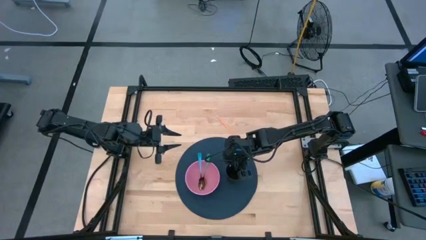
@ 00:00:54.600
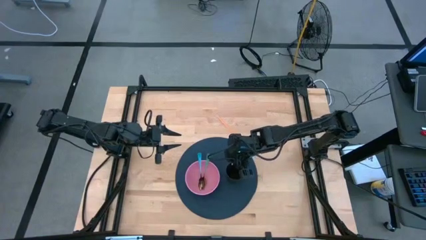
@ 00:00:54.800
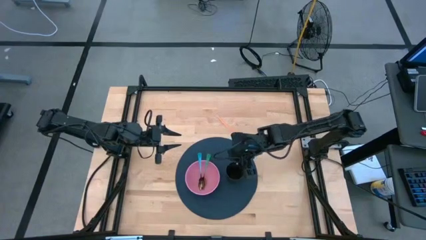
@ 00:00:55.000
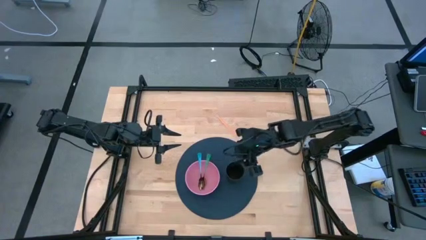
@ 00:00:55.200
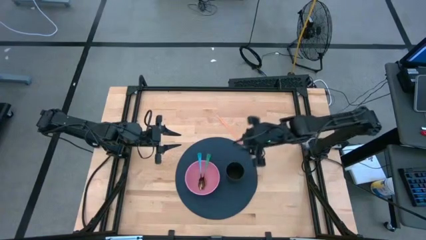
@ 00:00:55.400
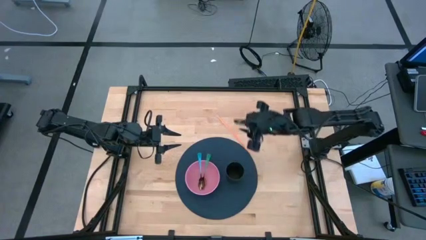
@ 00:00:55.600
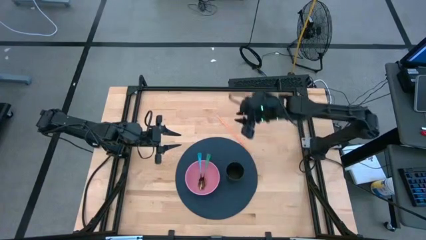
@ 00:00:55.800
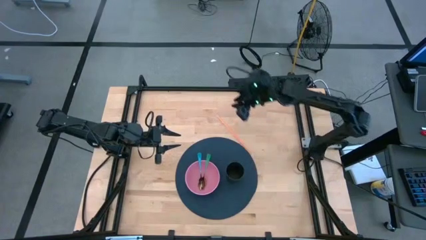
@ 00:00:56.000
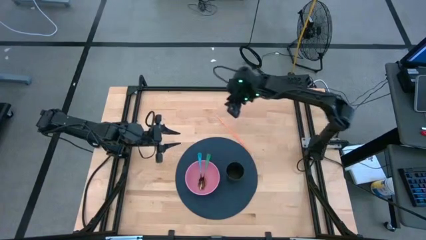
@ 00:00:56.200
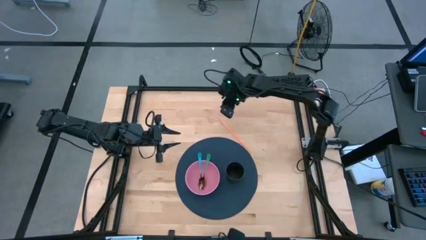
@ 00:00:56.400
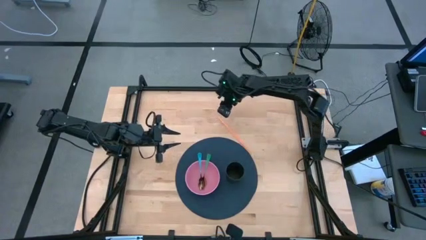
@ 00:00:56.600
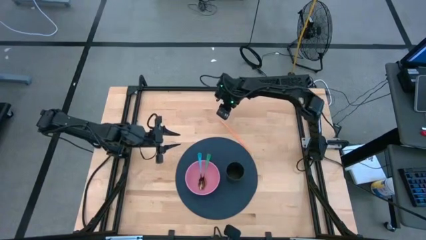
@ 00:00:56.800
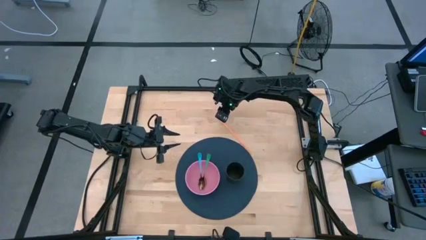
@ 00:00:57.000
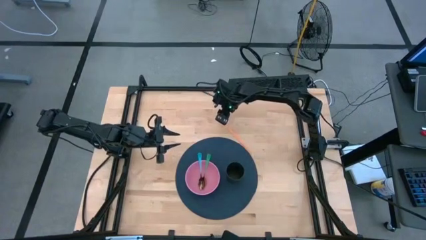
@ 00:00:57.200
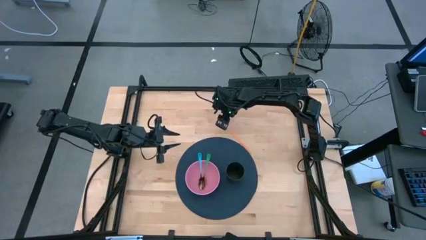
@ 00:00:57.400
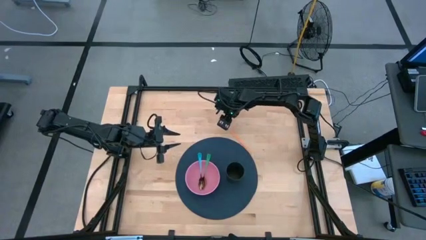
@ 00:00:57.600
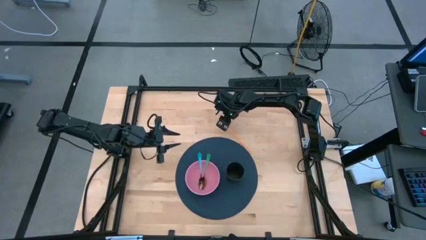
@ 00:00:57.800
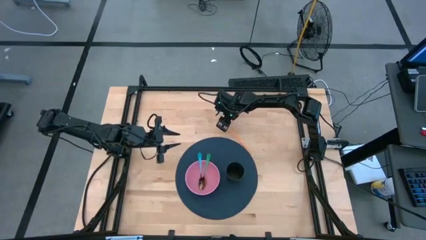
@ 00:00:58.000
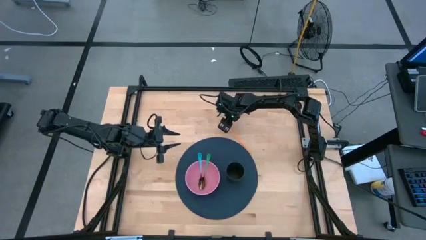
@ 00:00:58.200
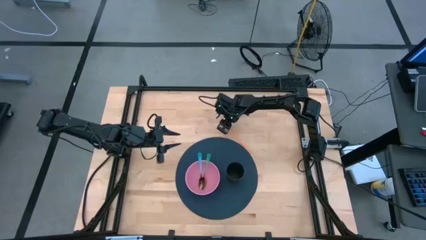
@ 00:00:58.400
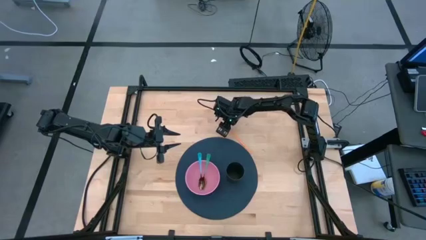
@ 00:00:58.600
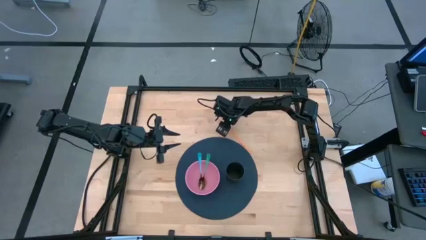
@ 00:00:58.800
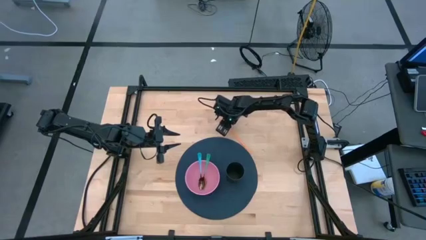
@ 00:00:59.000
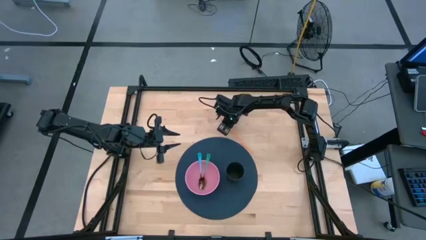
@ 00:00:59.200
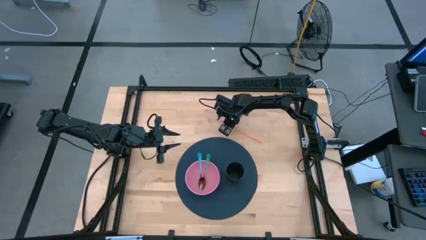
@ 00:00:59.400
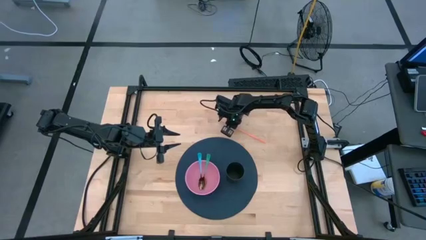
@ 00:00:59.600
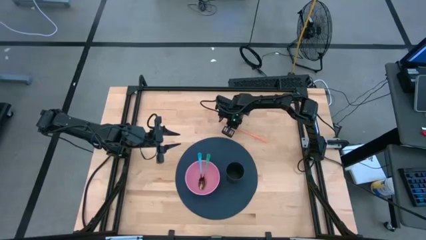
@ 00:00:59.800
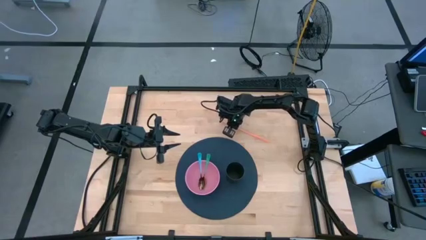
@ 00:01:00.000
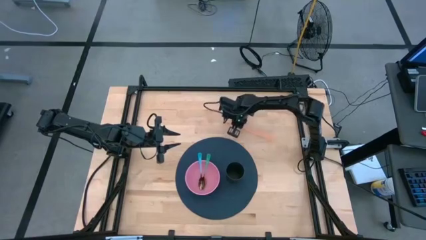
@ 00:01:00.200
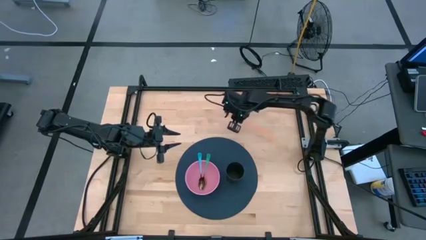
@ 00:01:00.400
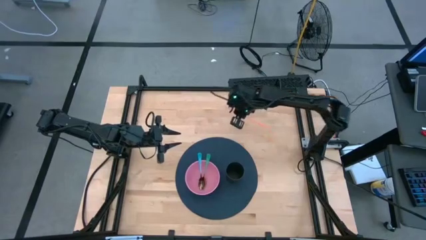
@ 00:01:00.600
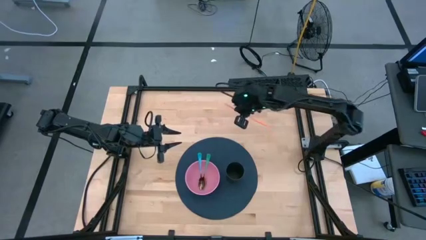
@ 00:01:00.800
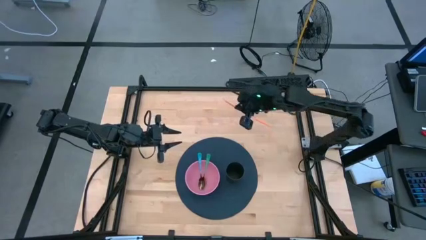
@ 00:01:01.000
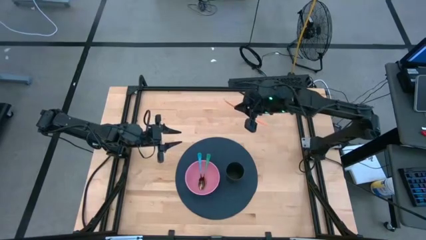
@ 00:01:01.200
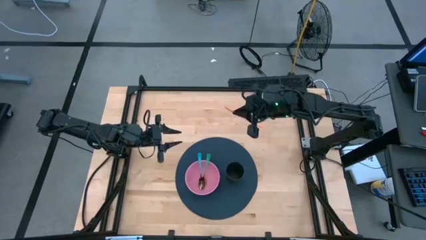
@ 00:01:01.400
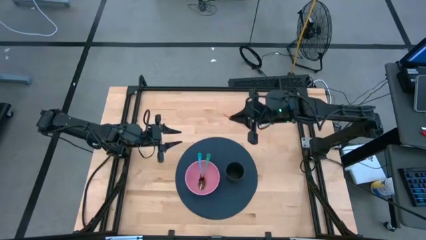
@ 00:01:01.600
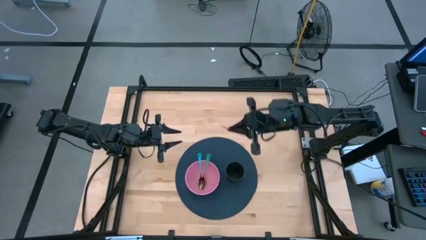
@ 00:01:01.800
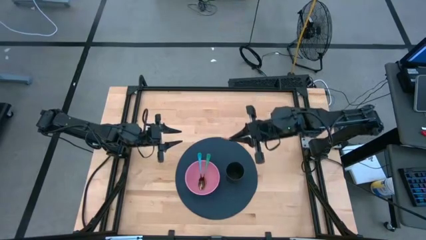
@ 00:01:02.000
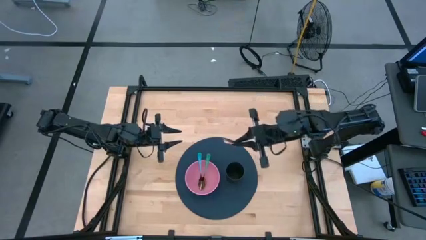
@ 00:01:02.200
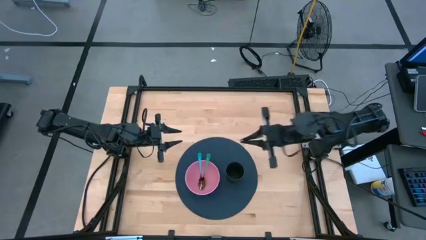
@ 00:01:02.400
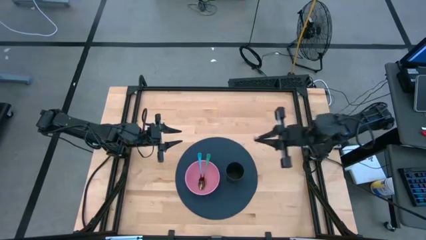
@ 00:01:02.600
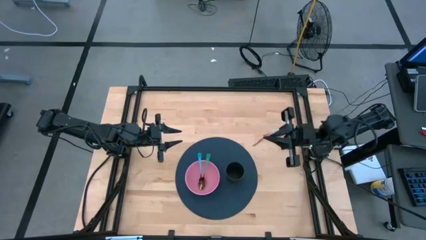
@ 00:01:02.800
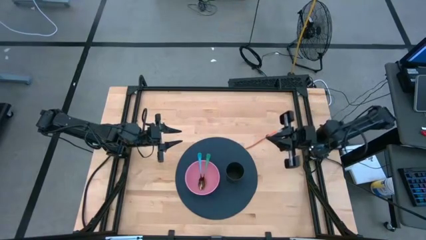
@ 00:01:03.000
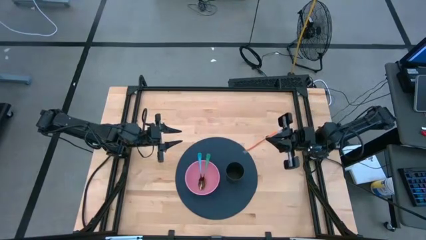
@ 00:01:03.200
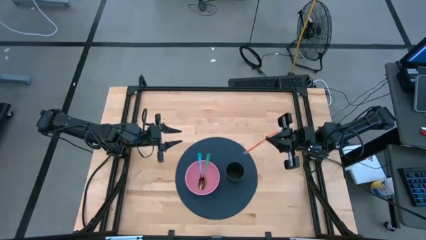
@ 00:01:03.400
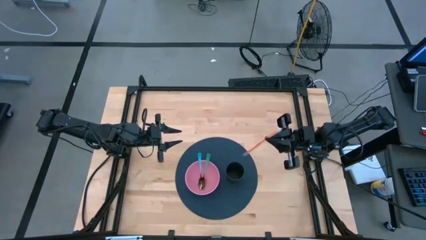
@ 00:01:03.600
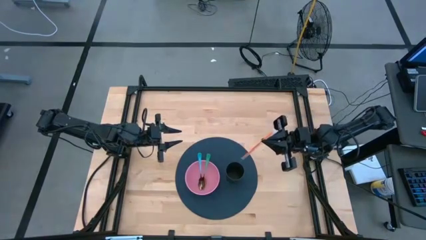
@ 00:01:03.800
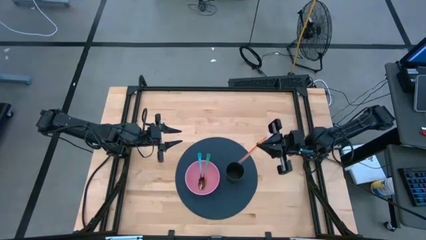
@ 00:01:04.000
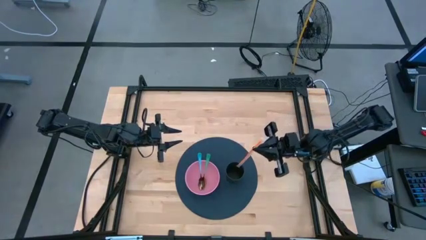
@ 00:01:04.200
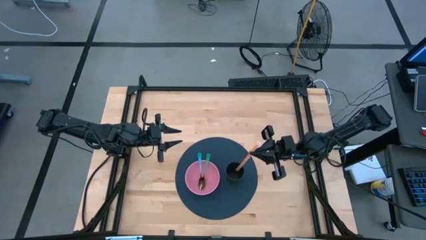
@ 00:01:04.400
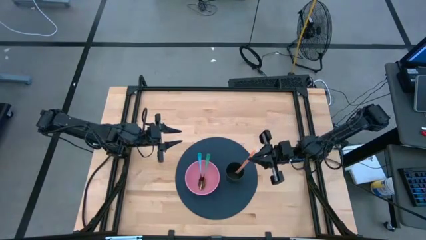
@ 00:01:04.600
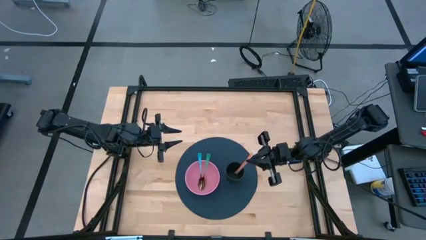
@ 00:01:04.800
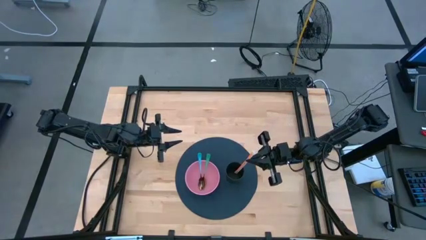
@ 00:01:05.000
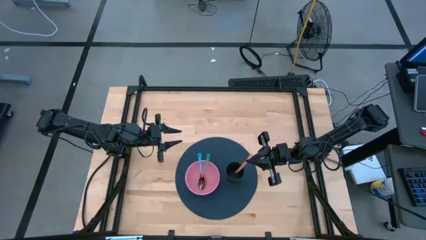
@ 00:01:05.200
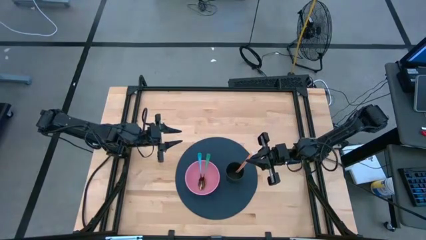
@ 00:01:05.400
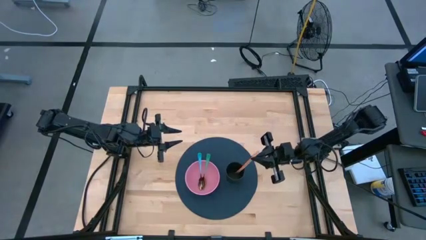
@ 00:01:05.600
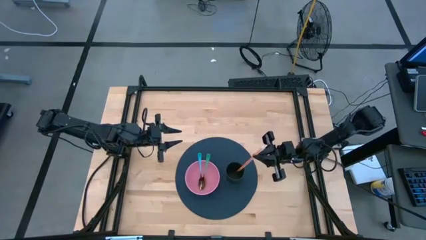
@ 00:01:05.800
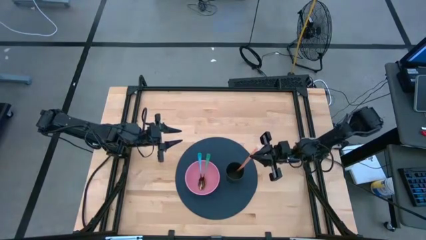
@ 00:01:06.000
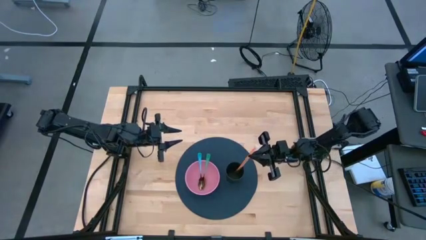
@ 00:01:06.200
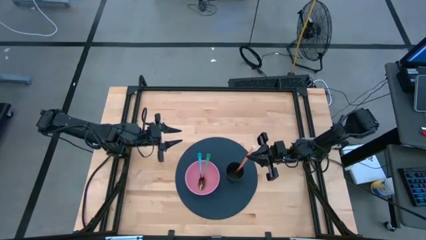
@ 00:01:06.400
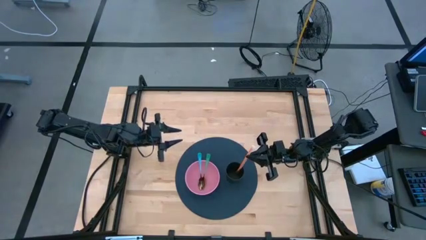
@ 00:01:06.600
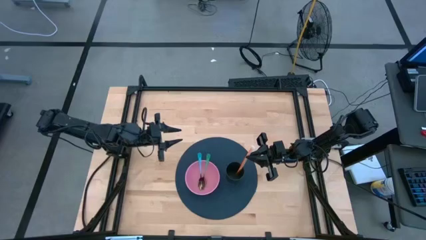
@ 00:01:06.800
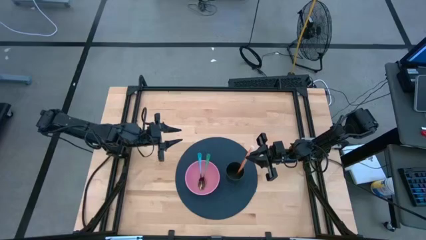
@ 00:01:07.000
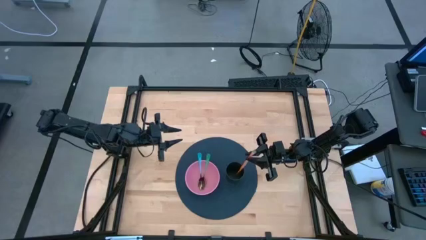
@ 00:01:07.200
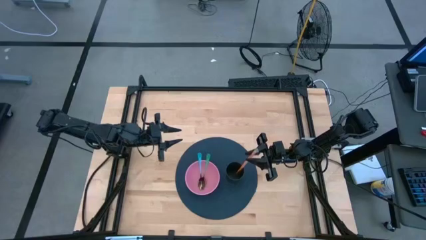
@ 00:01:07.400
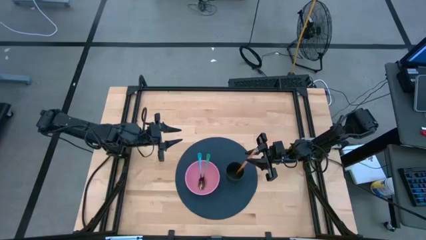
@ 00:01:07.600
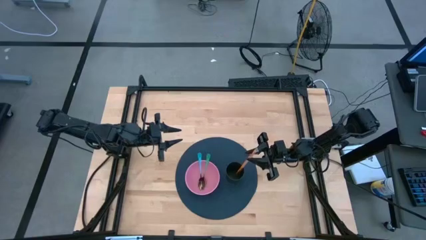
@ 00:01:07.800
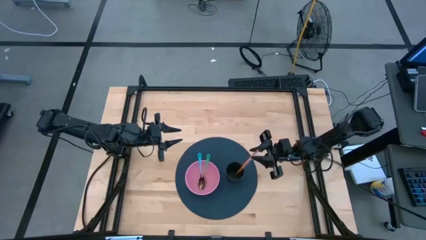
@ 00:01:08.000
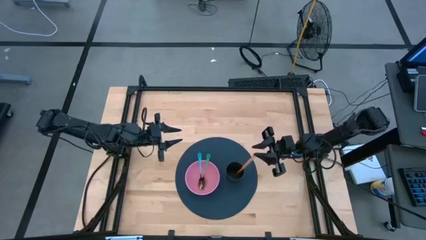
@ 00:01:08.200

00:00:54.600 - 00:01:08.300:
Task: Pick & Place Utensil
Put the orange straw into the black cup on the blue mat
